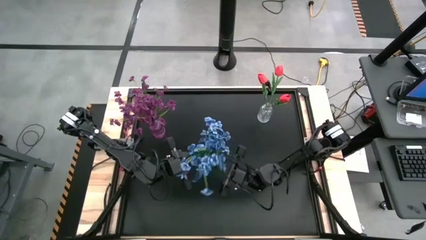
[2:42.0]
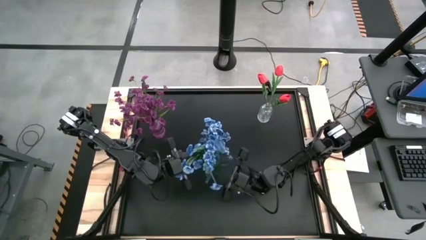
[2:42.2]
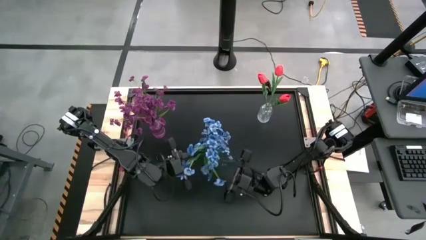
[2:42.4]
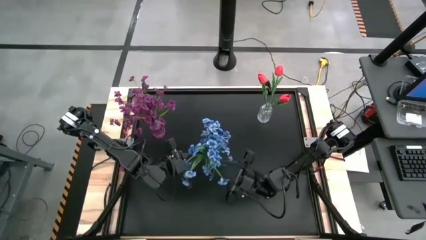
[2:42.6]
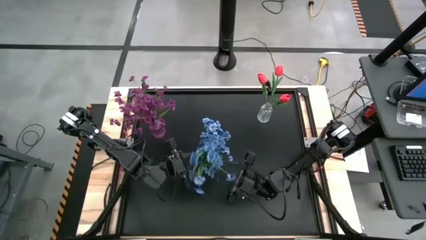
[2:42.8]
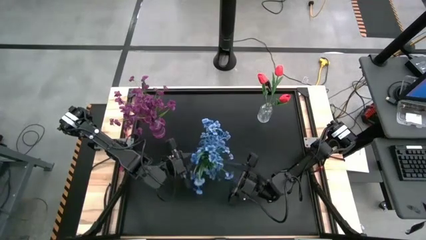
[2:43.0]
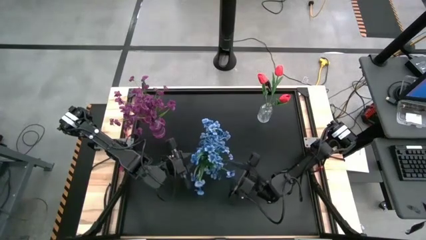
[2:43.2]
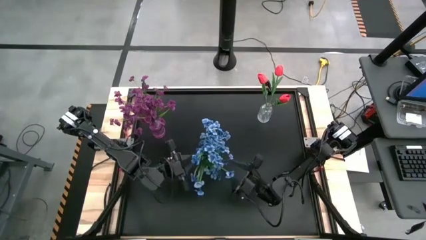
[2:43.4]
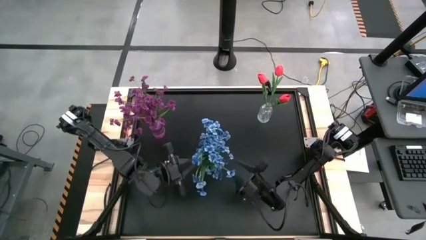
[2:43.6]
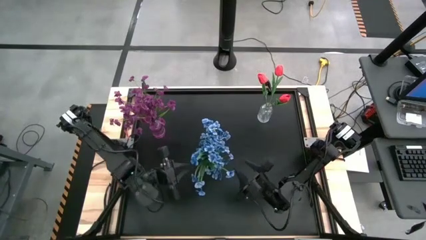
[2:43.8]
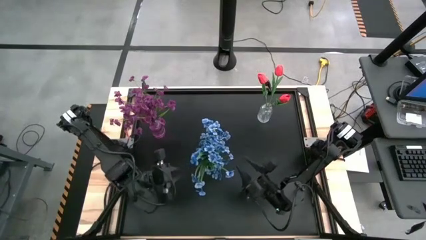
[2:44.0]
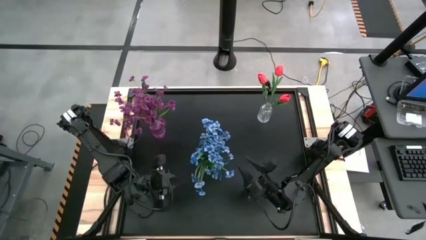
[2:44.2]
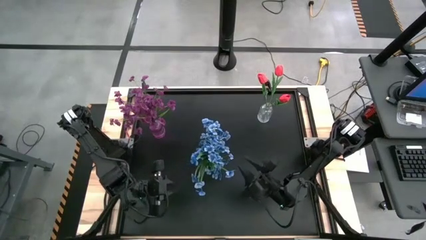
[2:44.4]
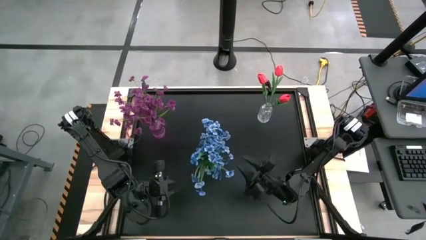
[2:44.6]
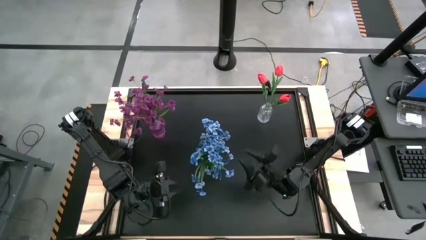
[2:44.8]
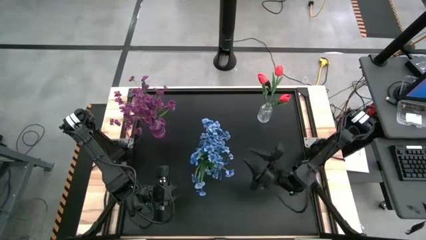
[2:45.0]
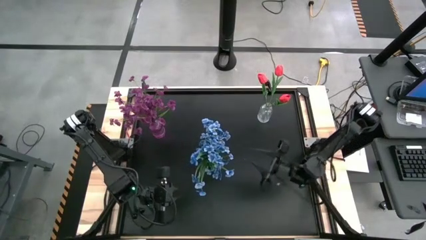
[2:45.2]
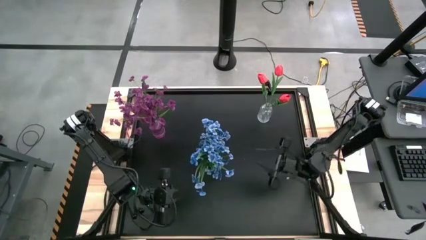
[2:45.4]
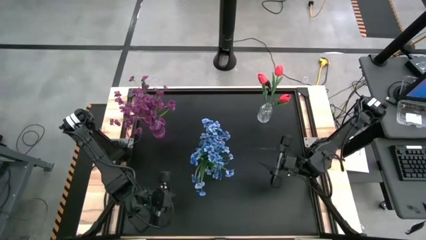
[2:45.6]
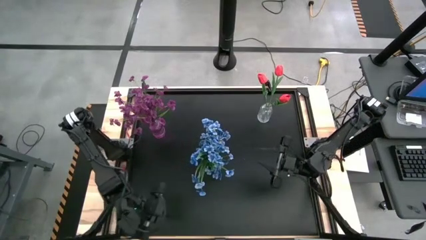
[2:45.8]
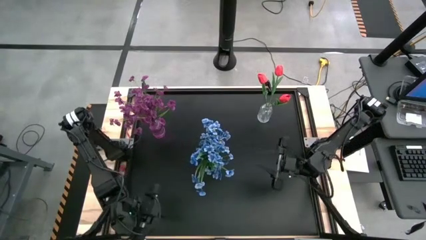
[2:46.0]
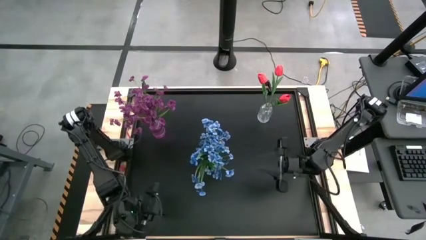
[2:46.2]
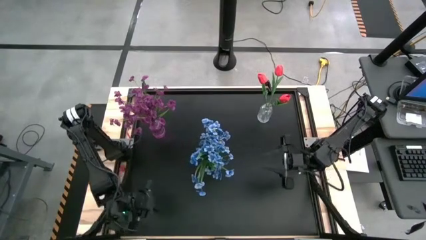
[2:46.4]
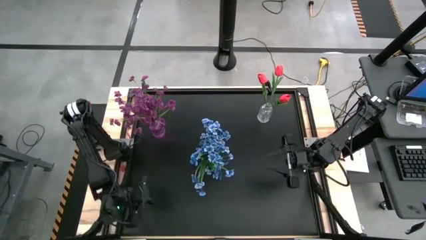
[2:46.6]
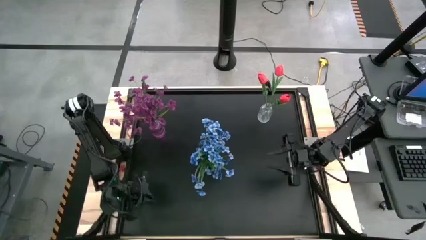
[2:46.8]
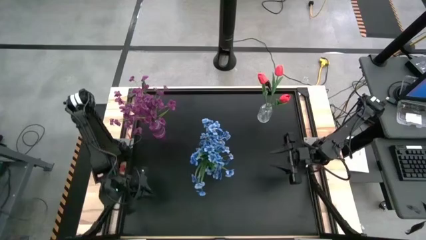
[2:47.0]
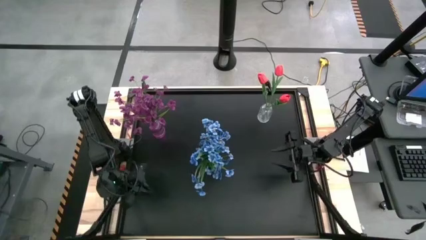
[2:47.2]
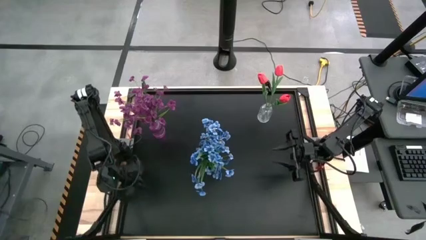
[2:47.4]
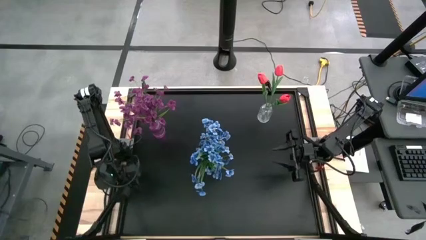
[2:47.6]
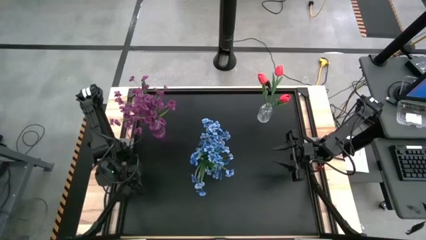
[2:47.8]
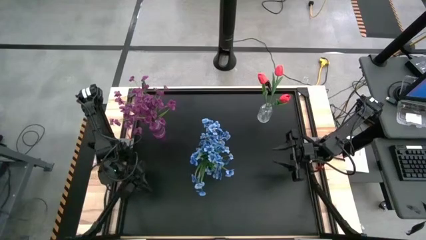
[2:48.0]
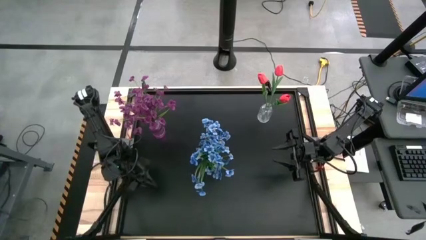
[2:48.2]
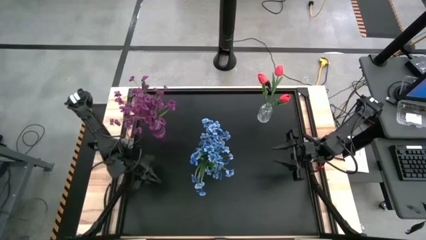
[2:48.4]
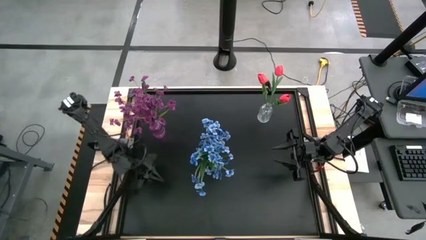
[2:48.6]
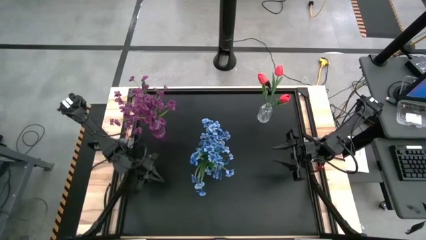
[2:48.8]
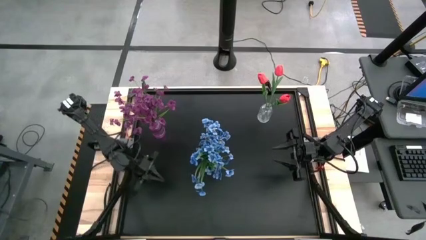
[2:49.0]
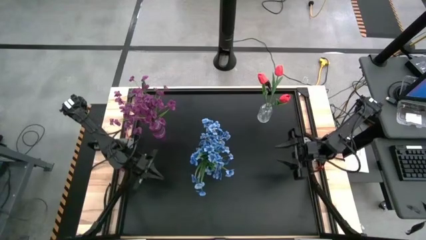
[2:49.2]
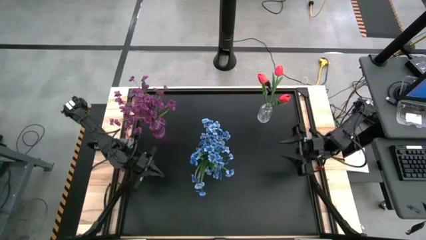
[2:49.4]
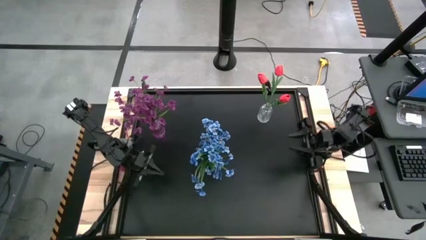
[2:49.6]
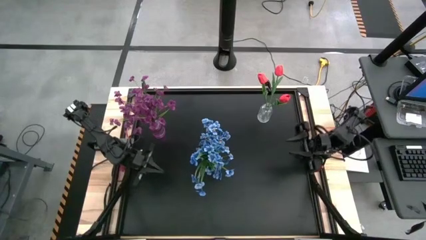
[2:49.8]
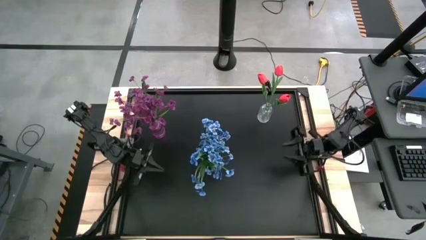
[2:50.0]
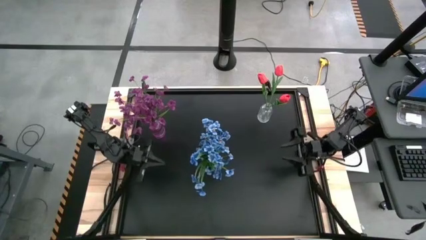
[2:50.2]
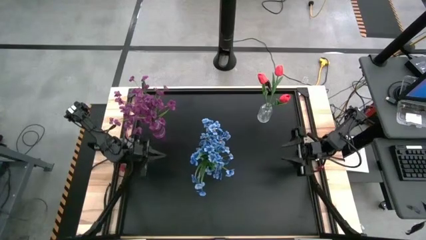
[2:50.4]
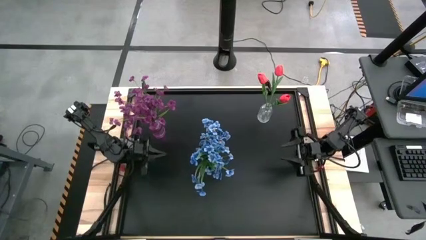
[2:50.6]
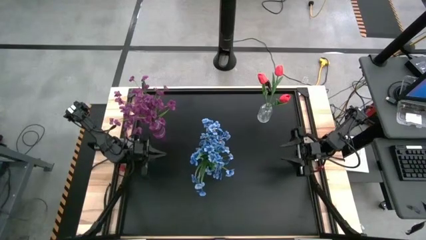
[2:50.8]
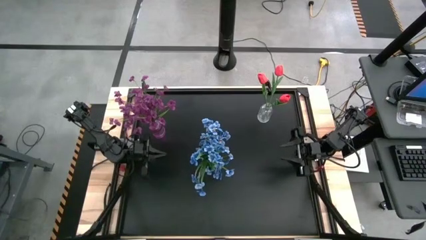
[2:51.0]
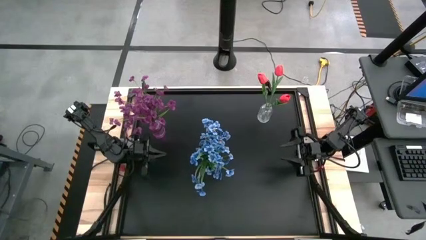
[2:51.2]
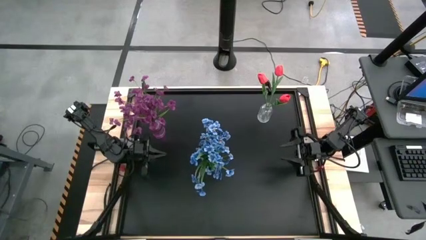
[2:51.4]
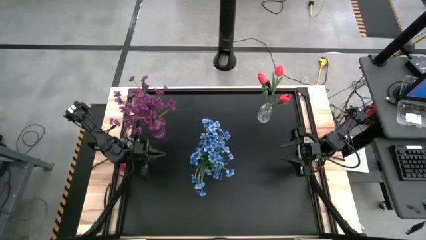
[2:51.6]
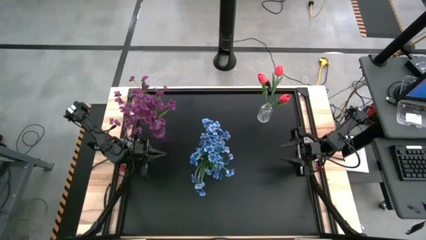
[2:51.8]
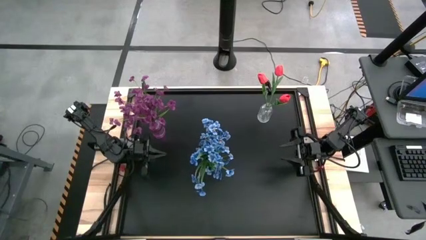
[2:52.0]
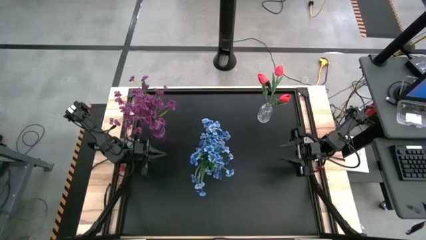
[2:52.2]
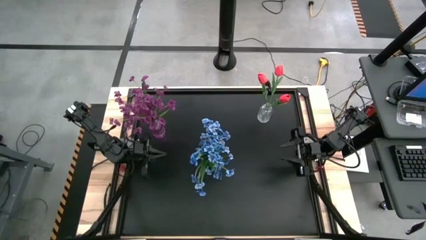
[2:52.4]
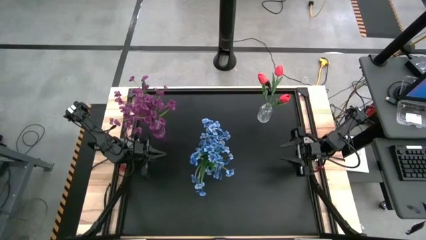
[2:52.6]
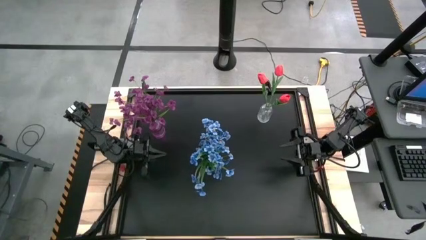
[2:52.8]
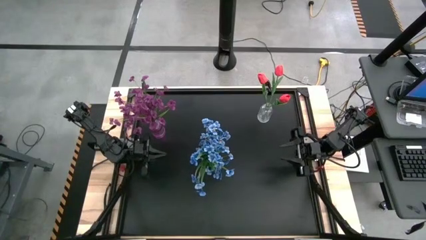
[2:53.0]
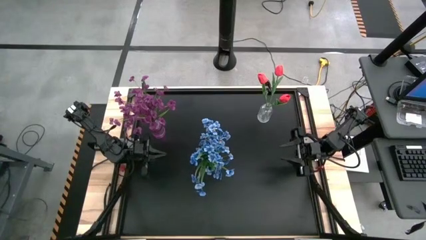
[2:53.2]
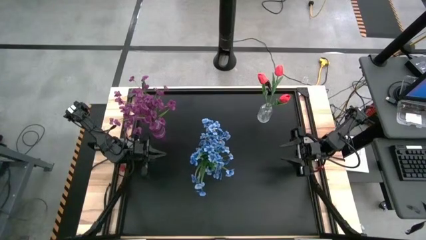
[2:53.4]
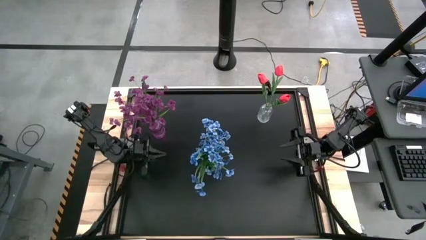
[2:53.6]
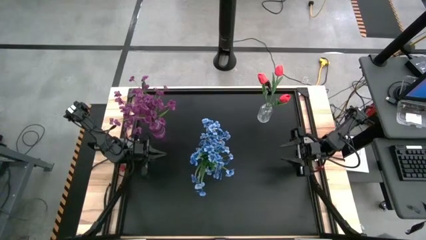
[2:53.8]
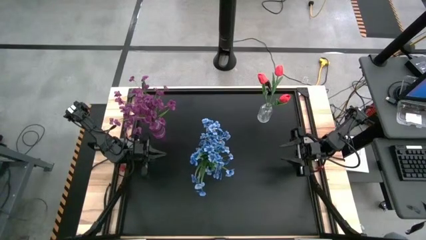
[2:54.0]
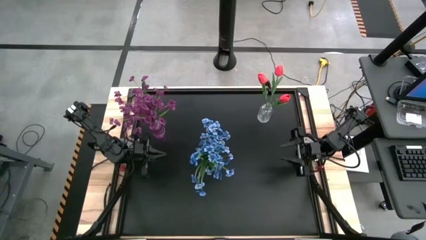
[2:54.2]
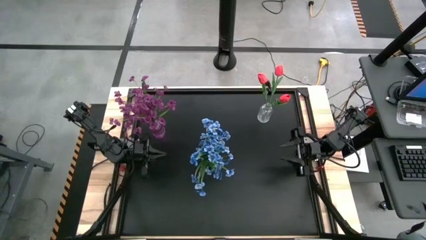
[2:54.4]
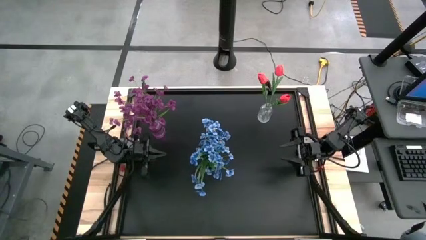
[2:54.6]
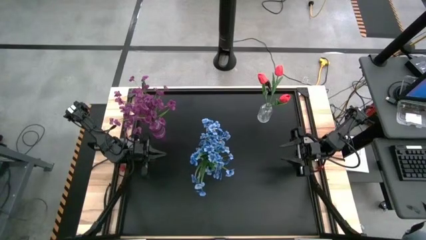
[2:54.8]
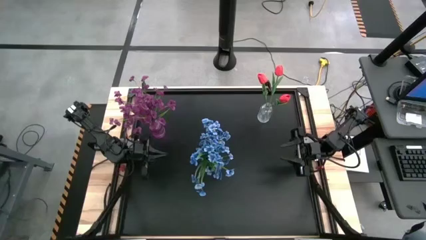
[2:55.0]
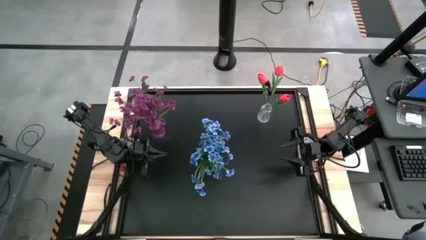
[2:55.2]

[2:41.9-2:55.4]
Task: Sort flowers into vase by color
Return to Home Position

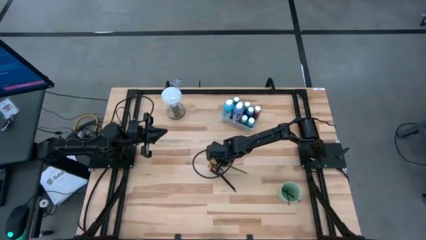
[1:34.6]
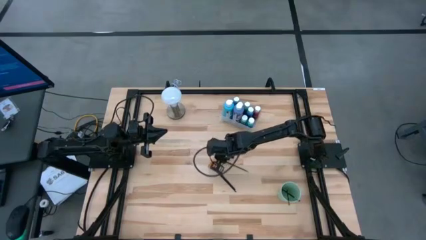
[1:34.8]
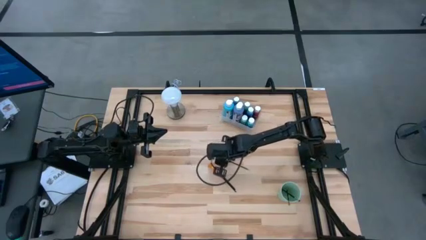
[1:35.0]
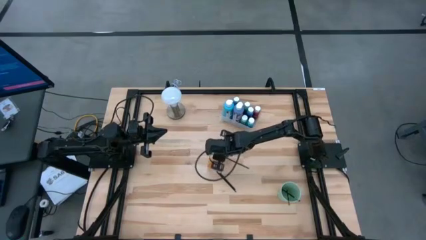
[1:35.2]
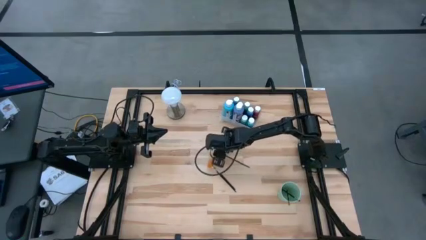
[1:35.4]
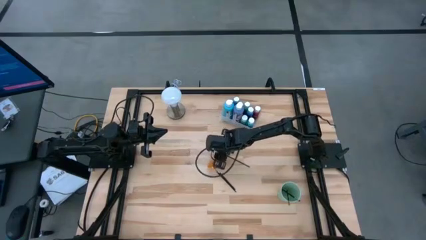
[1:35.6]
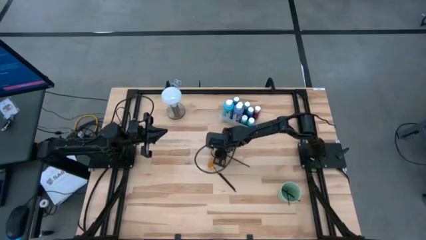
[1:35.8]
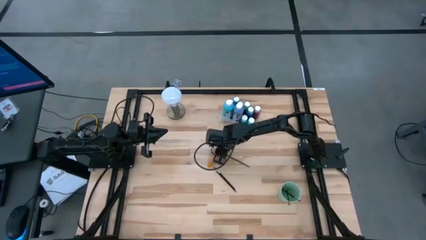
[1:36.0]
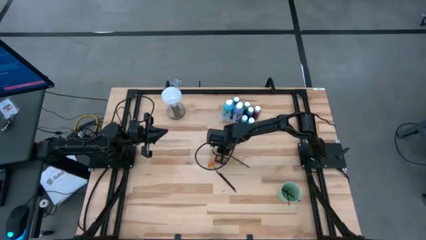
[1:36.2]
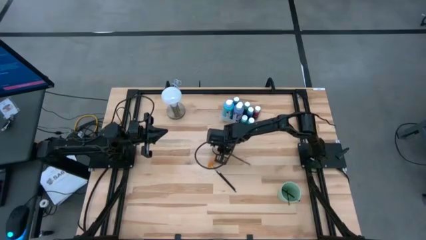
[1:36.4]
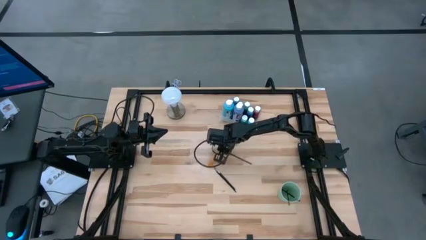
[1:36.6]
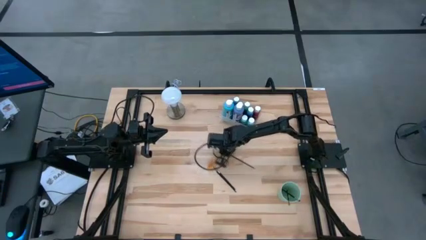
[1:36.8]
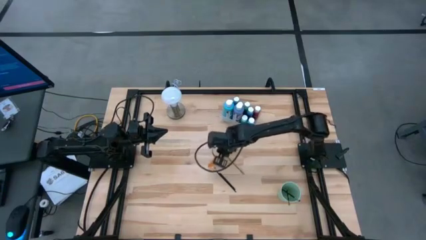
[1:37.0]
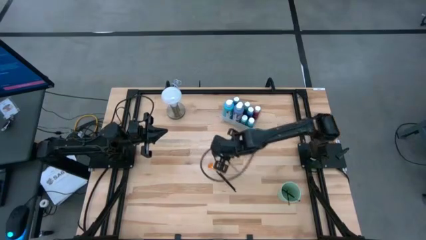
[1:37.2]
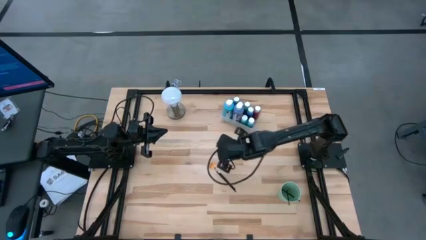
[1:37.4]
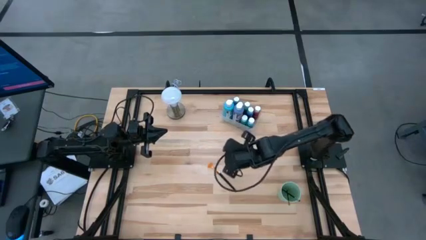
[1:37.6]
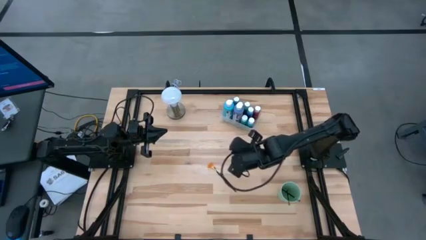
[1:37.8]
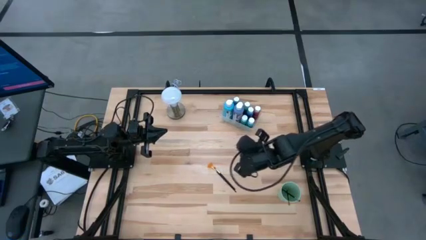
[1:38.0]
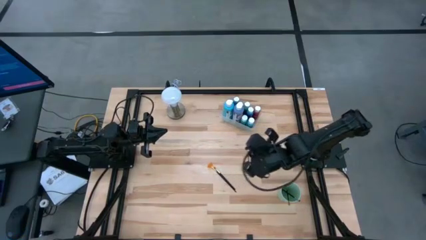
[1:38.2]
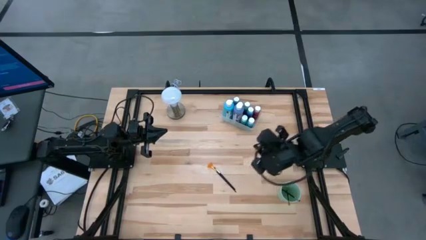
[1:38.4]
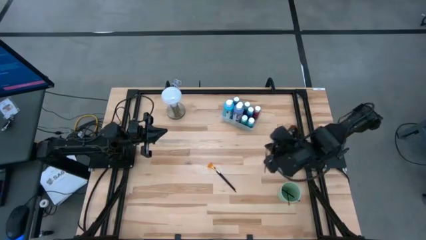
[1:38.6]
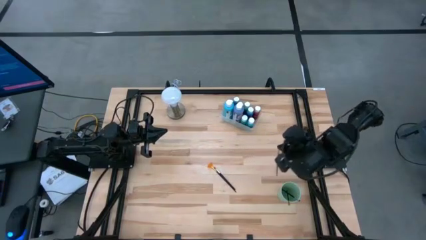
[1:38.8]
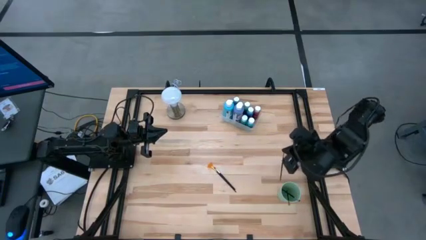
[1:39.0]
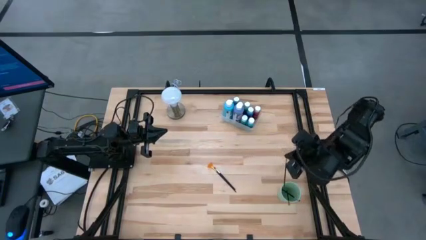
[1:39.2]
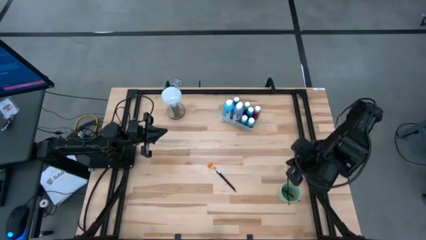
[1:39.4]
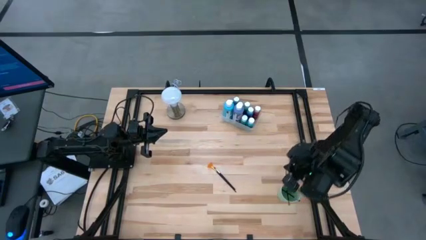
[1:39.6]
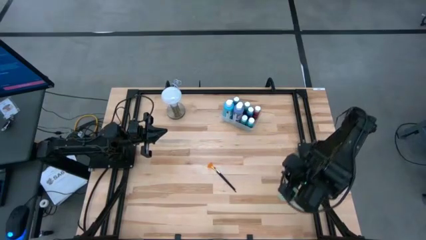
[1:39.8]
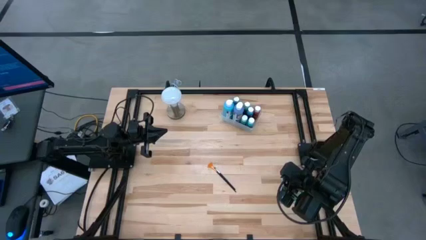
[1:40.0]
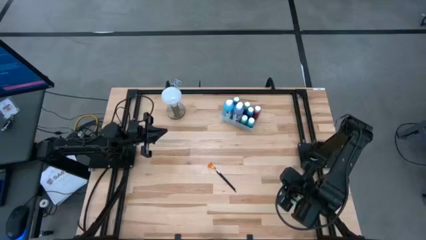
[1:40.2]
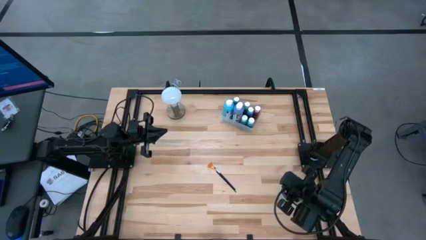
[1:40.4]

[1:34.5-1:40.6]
Task: Pick & Place Paint Supplies
Put the black paint brush into the green cup
